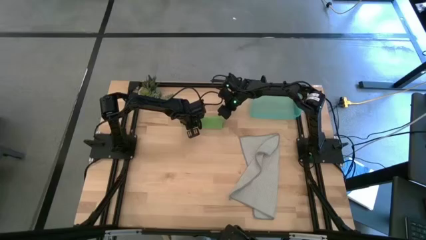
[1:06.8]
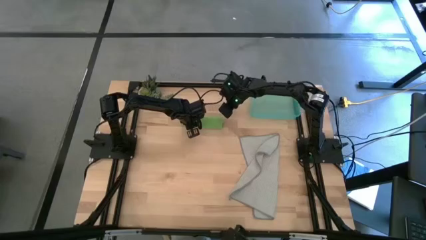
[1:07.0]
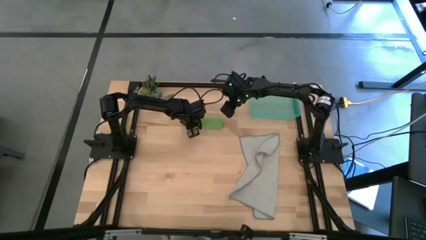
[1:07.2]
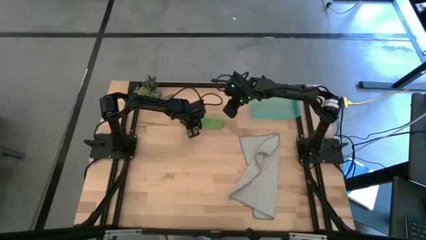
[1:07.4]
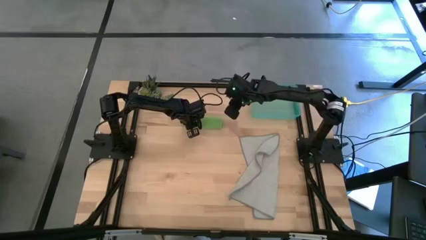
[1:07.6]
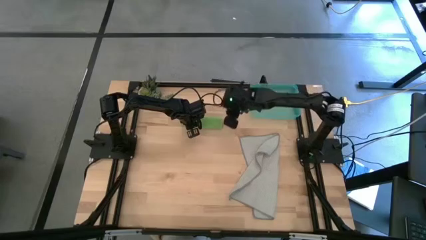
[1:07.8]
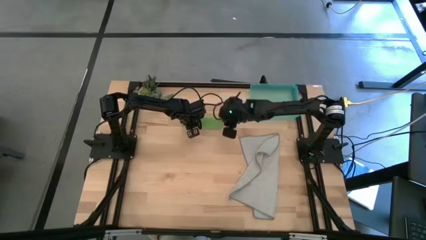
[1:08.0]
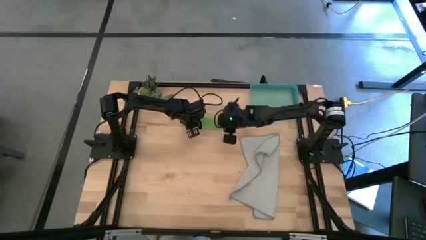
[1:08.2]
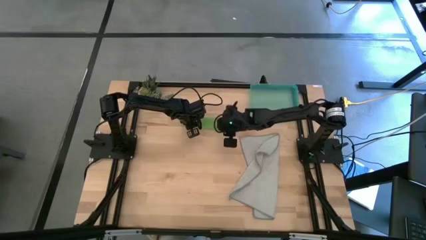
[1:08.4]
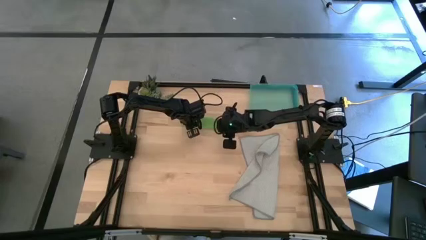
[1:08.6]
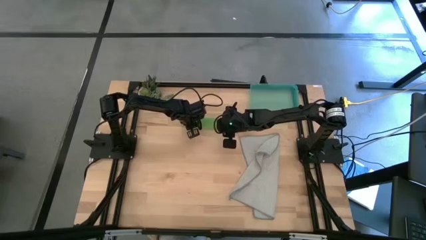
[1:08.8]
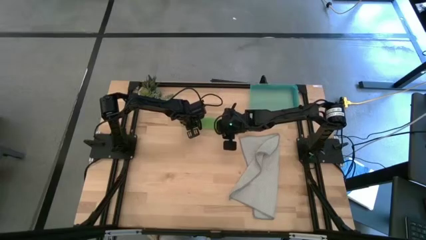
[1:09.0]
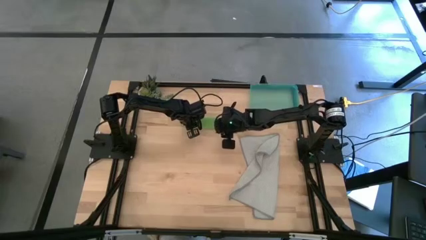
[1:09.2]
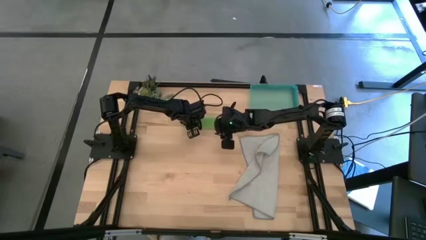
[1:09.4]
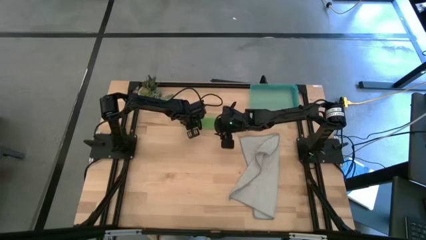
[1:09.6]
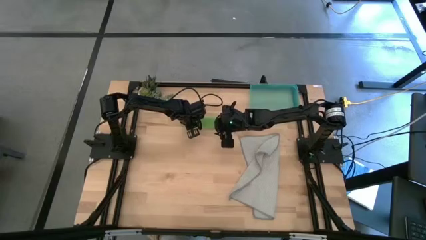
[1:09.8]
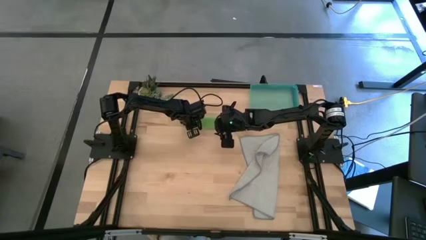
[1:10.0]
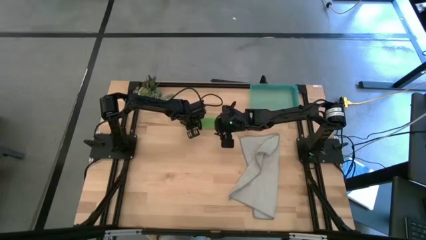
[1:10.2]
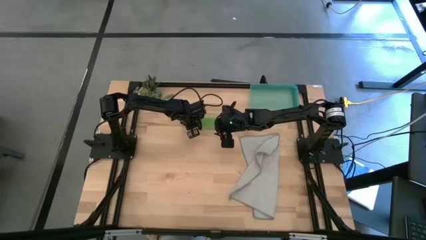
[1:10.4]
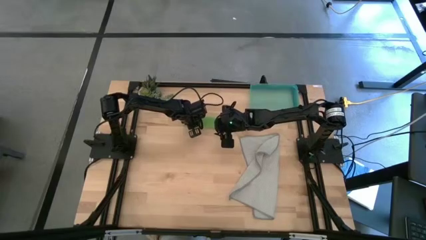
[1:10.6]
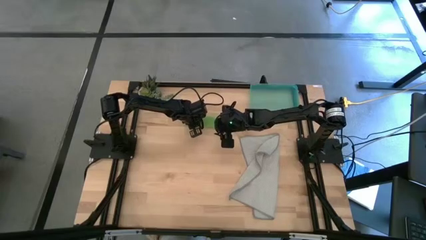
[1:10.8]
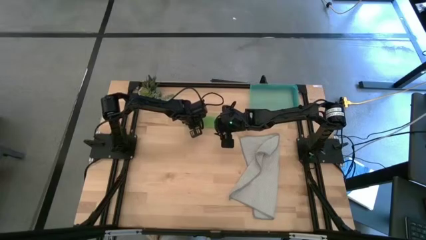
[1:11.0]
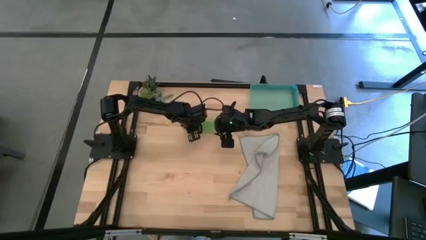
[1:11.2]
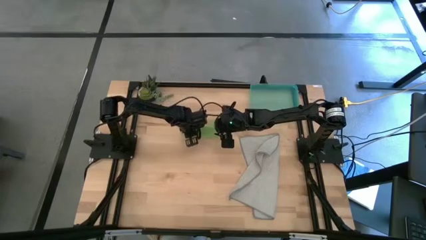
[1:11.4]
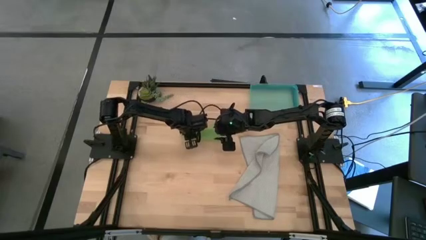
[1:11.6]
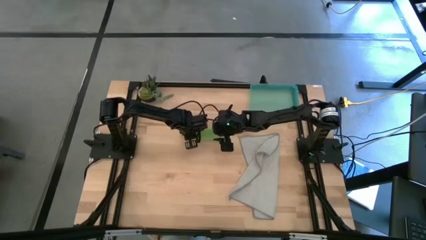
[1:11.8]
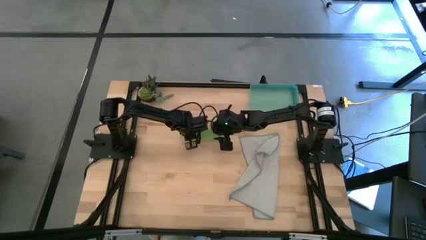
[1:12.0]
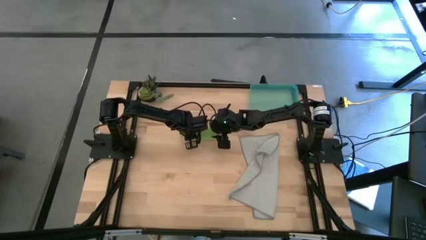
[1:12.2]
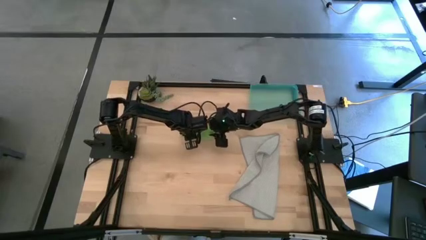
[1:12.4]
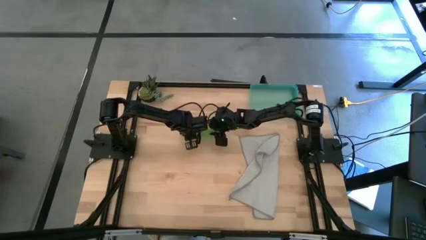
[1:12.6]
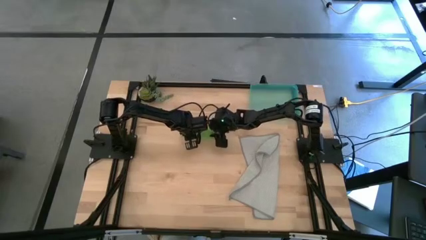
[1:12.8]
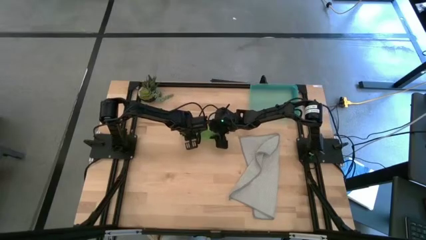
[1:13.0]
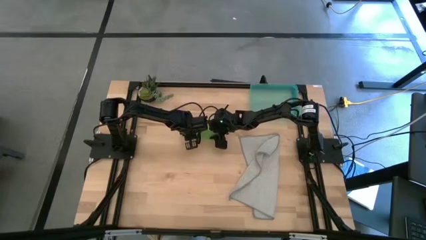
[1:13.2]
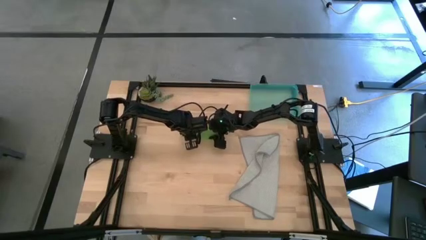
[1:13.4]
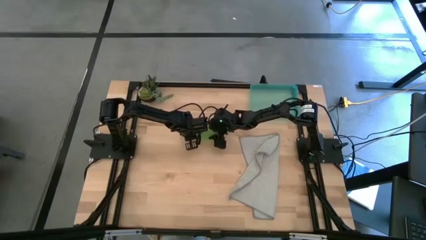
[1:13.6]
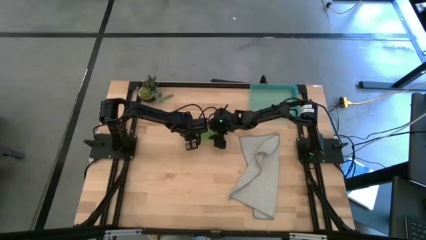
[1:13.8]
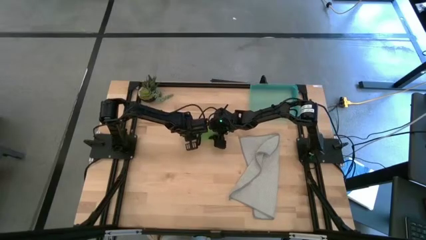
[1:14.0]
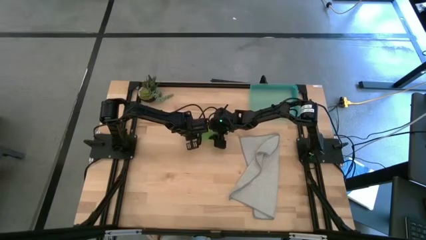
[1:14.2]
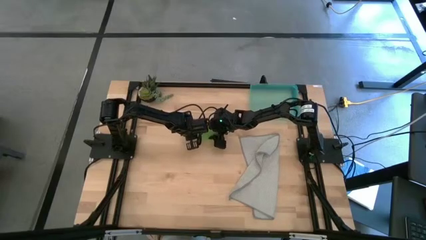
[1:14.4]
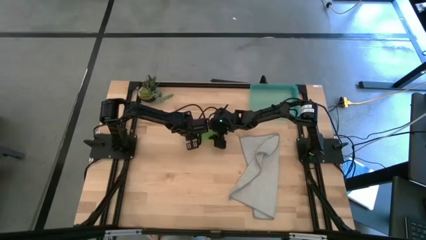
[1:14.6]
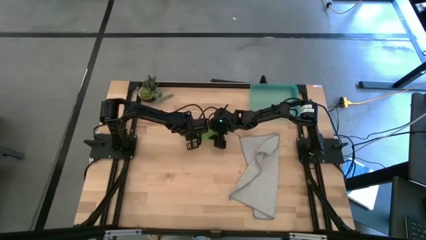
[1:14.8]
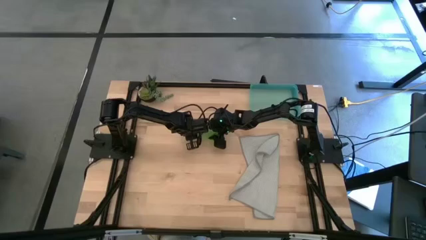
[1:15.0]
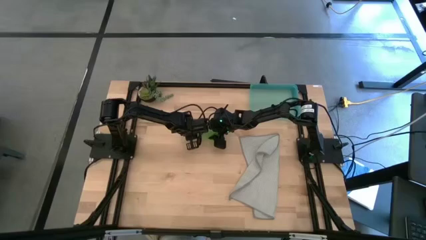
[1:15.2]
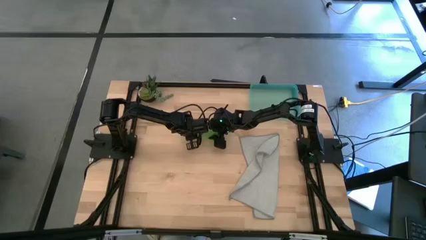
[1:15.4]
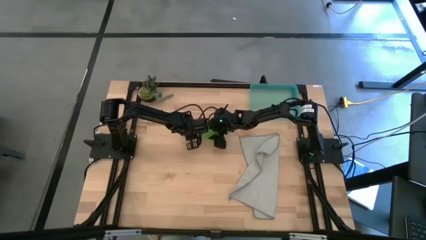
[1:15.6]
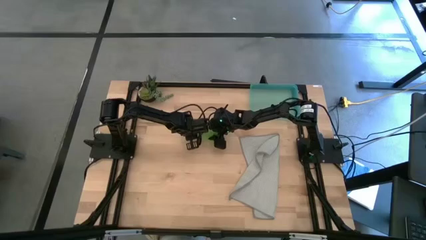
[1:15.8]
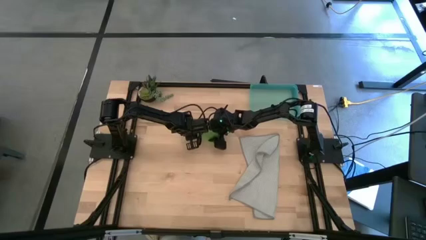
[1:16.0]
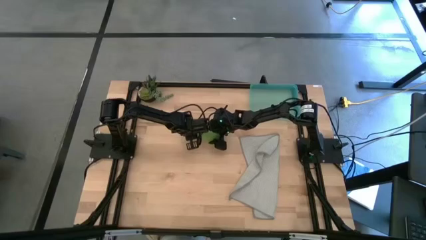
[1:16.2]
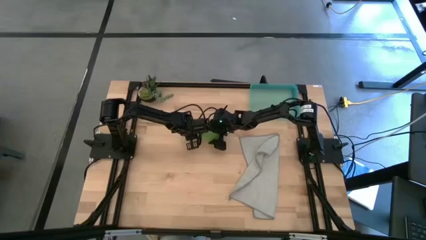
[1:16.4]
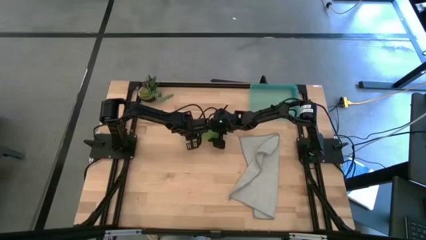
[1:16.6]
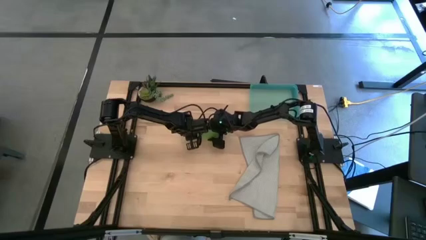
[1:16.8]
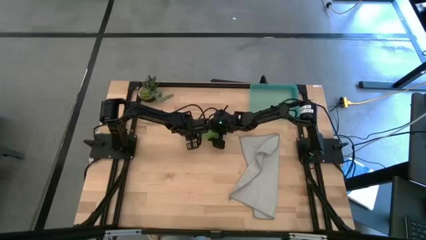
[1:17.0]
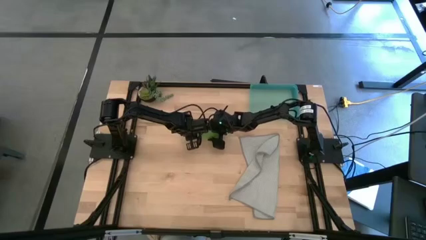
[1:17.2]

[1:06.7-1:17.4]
Task: Roll microfiber towels into tight, uniform cylinder then place into a basket
Put the green microfiber cloth into the blue bin
